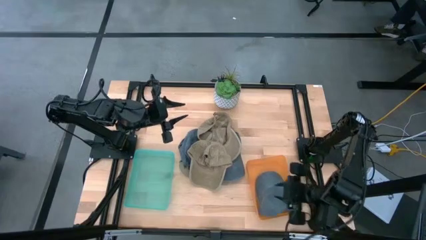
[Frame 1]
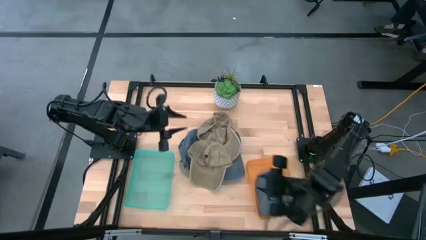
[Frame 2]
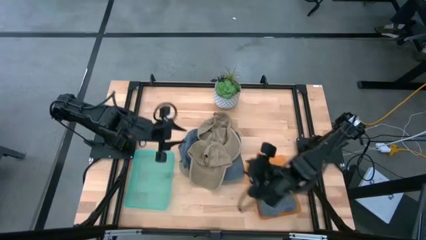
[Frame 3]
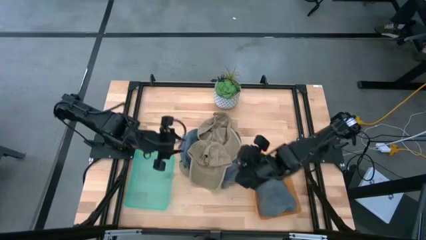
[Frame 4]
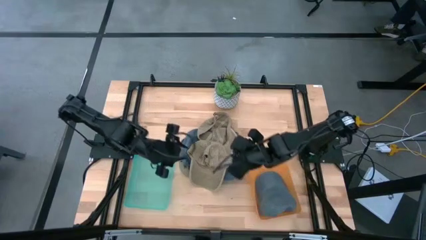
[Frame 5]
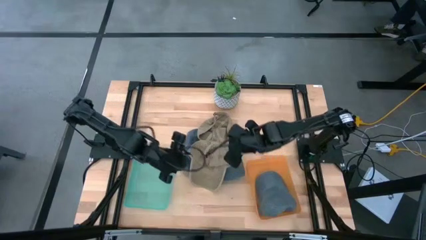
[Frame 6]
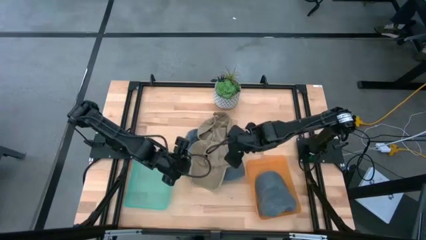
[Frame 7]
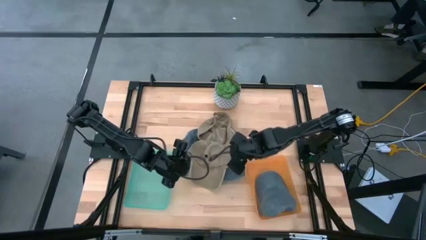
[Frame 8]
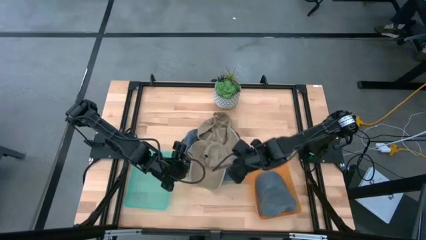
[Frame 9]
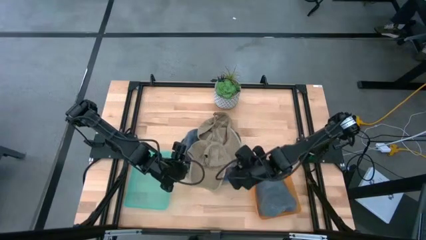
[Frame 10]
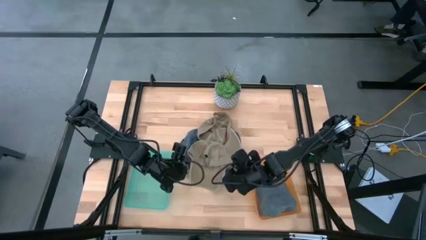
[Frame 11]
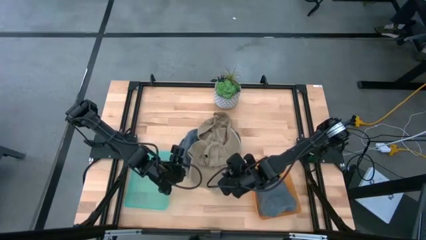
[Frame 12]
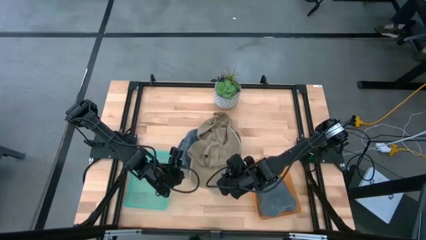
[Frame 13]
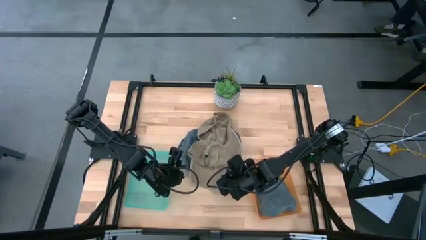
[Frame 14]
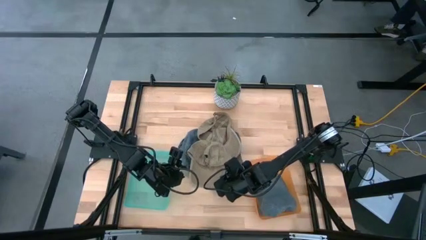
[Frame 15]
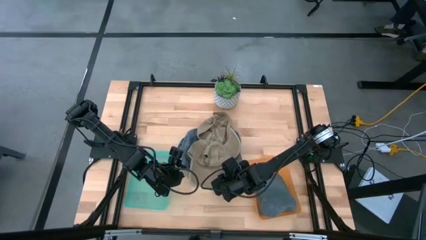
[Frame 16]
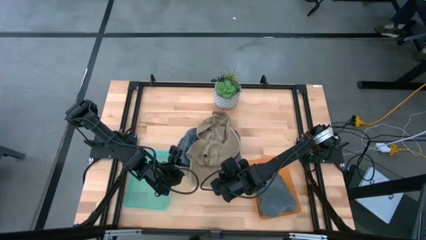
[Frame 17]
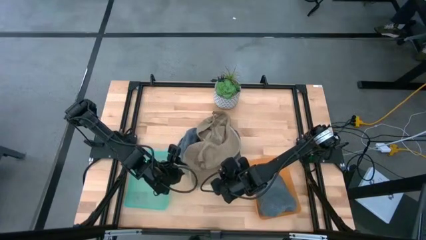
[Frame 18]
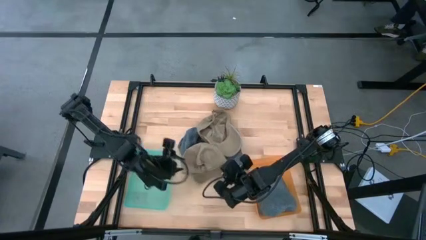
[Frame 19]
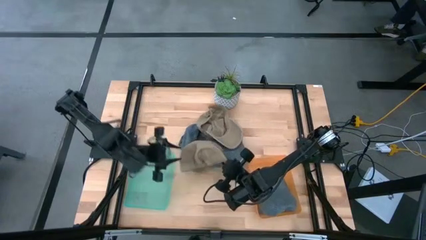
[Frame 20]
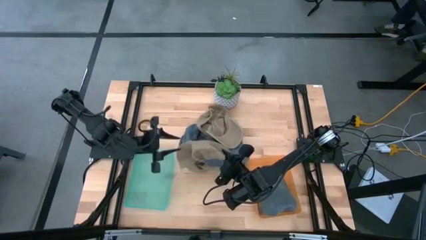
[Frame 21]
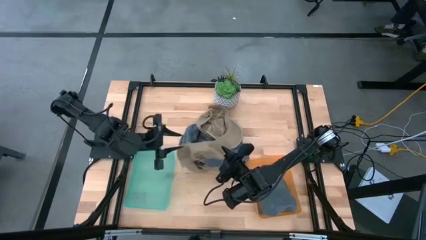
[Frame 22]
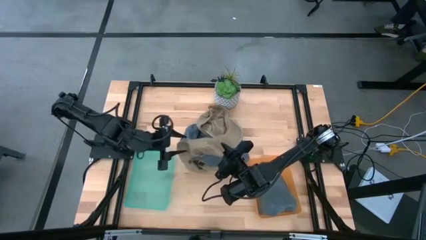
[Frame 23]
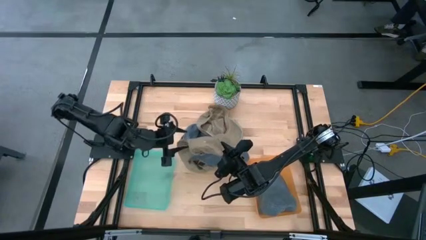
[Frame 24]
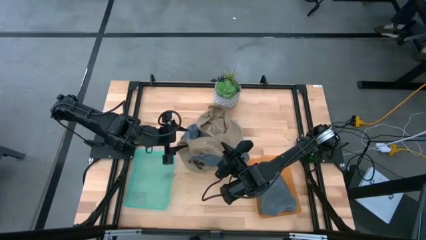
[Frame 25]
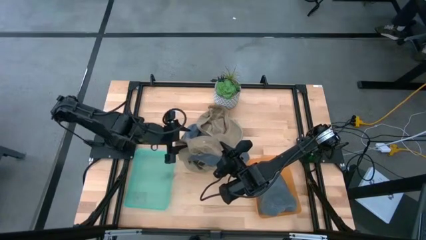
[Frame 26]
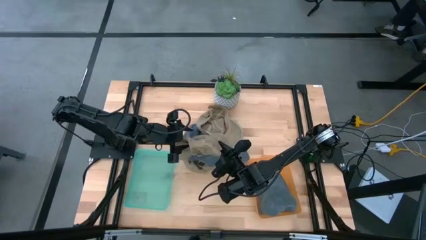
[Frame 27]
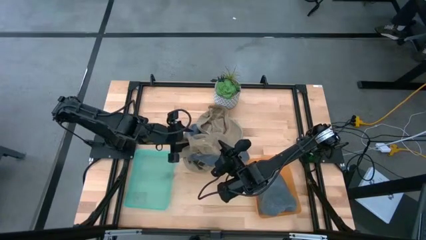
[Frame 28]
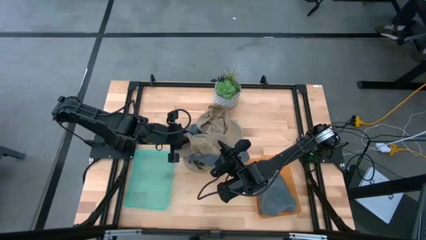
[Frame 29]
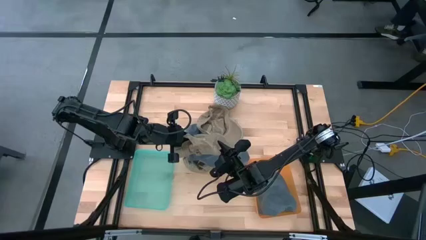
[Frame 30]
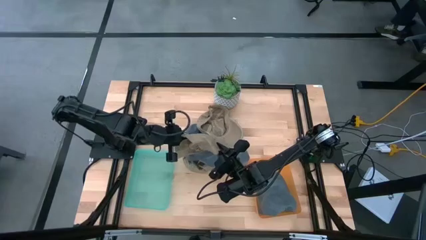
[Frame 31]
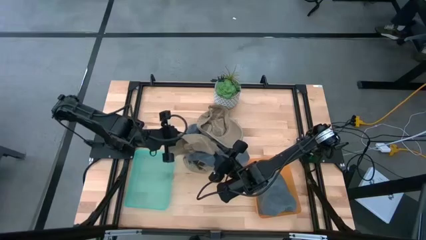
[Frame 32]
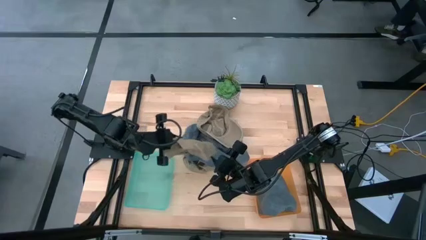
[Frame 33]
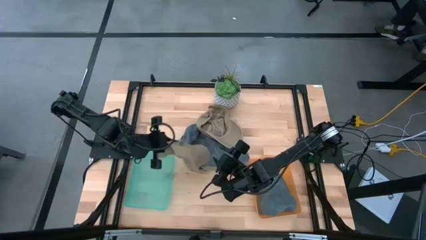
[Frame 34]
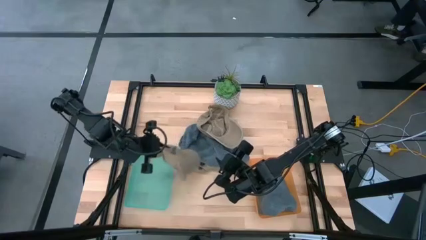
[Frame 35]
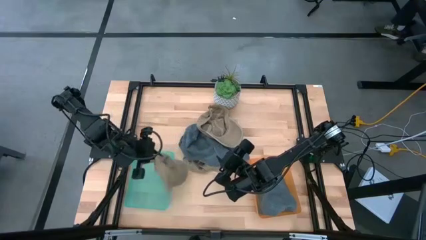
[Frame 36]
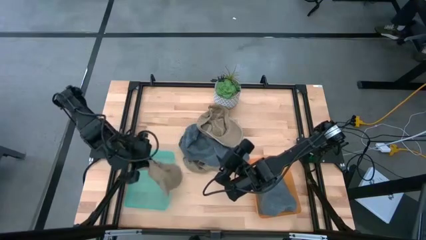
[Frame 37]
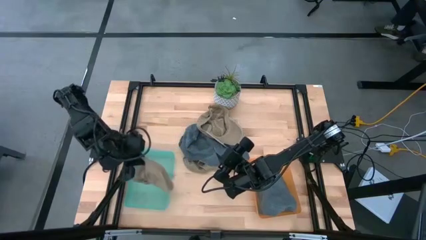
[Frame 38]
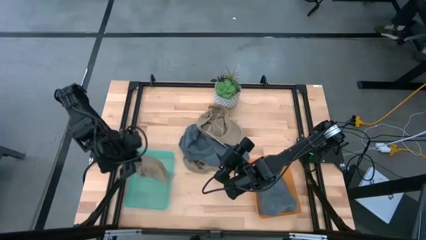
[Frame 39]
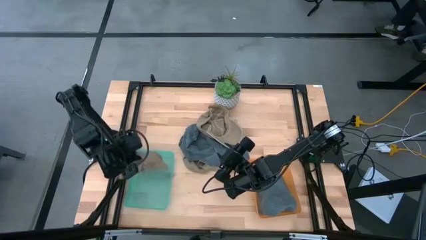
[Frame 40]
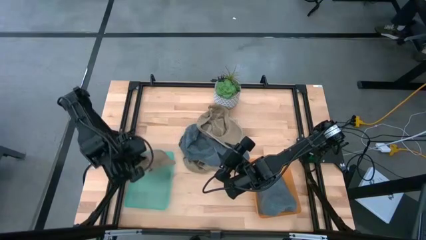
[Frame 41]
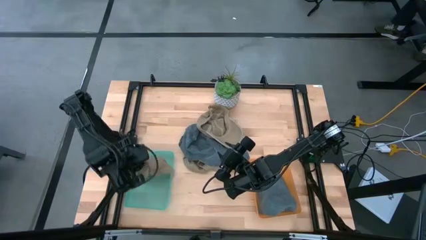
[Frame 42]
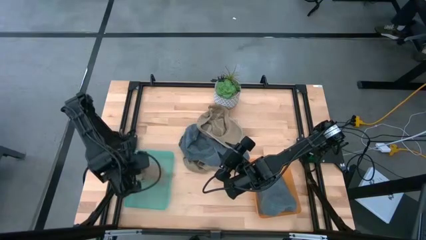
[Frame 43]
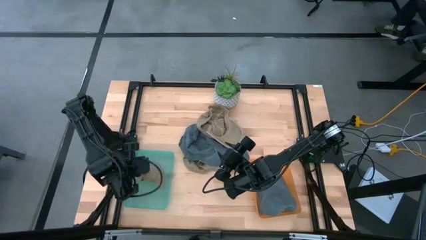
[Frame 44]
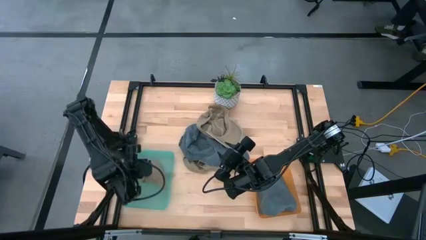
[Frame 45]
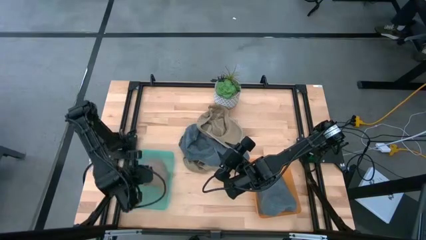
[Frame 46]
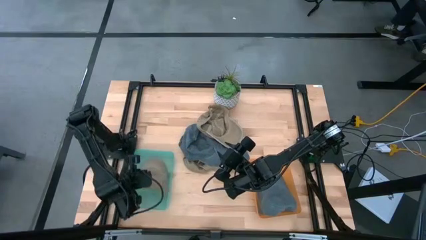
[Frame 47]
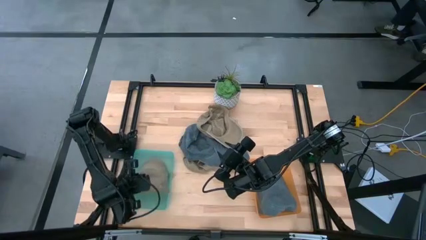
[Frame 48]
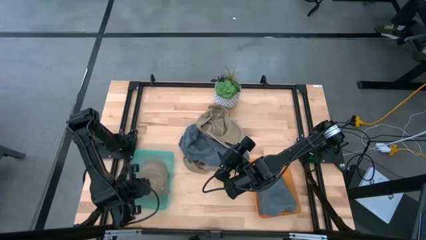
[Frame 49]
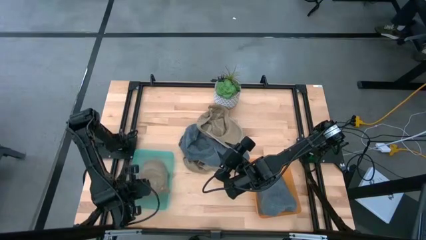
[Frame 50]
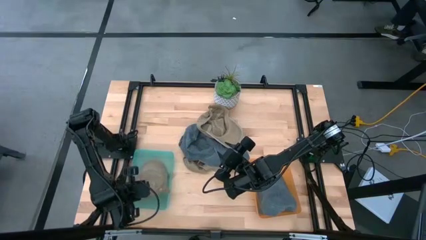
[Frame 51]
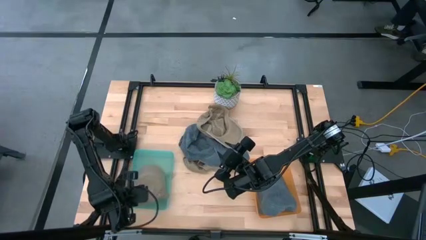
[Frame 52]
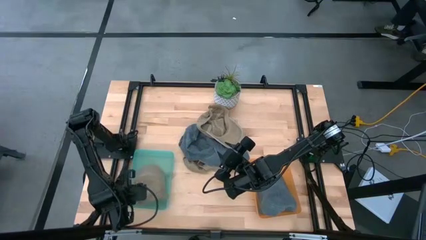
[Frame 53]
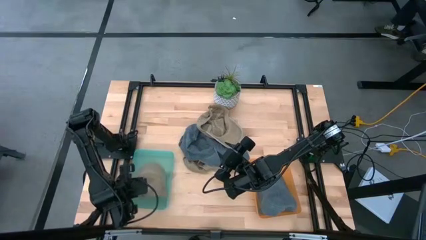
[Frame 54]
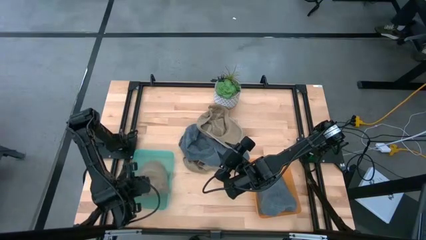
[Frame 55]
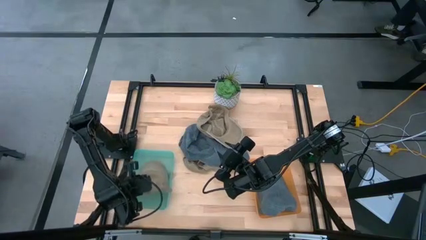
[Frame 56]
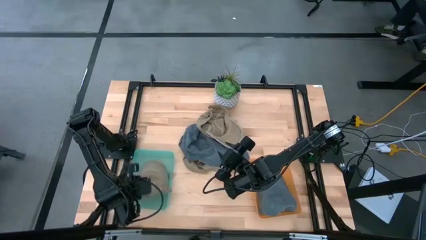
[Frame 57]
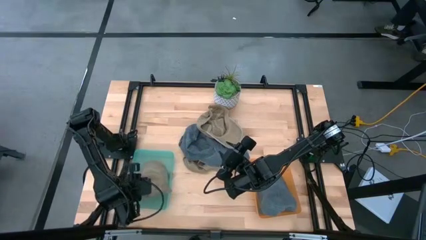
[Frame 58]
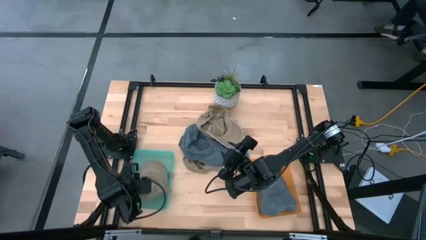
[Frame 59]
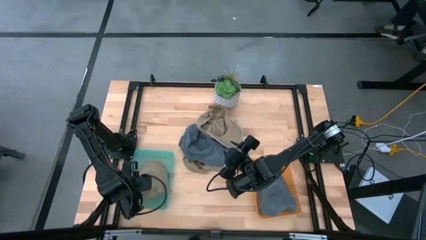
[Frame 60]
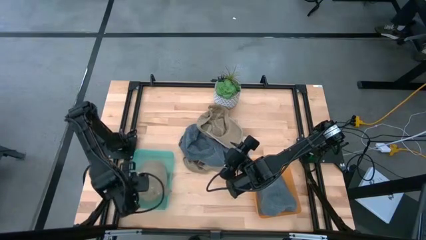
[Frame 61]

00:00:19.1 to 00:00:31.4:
Task: Pick & Place hat
Put the brown cap into the blue bin

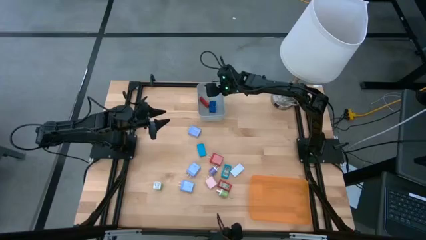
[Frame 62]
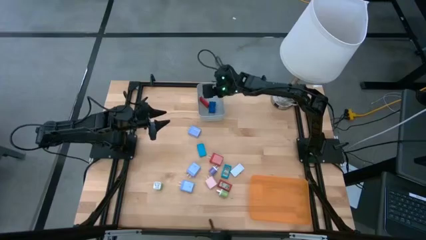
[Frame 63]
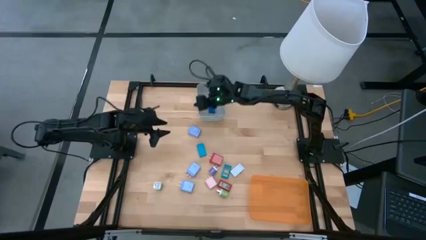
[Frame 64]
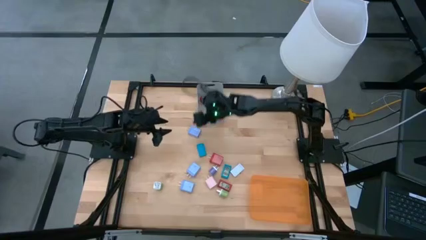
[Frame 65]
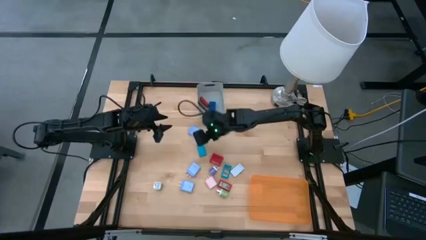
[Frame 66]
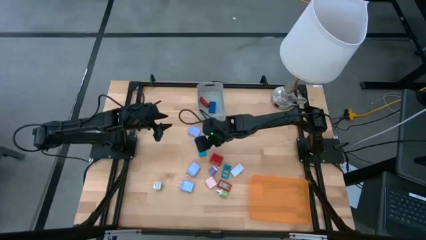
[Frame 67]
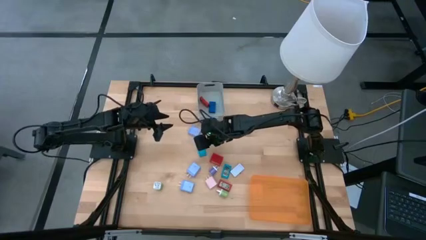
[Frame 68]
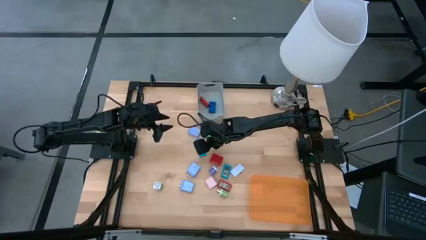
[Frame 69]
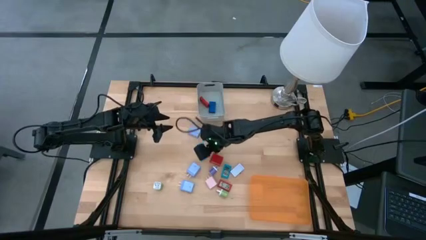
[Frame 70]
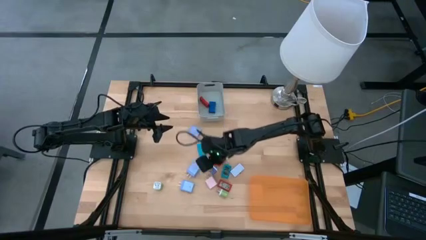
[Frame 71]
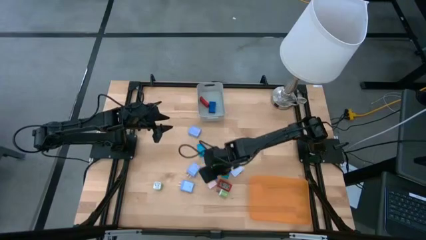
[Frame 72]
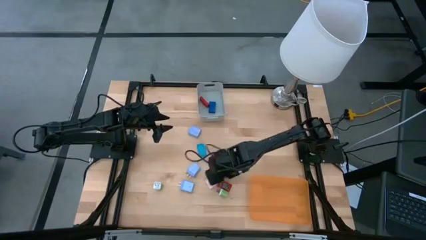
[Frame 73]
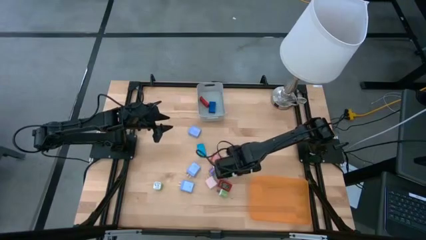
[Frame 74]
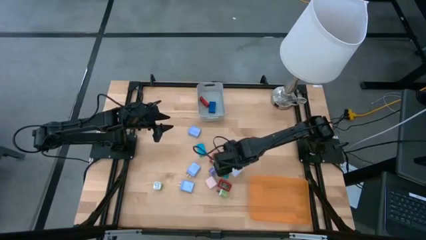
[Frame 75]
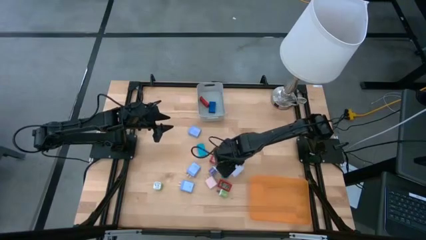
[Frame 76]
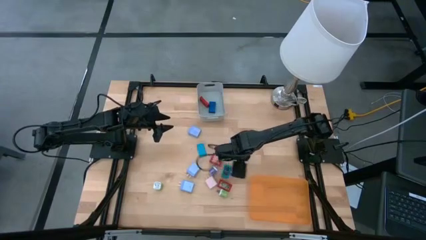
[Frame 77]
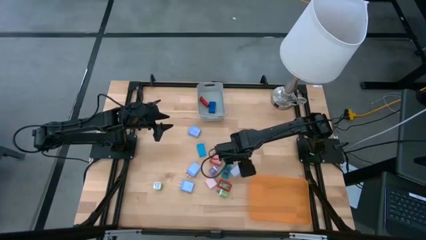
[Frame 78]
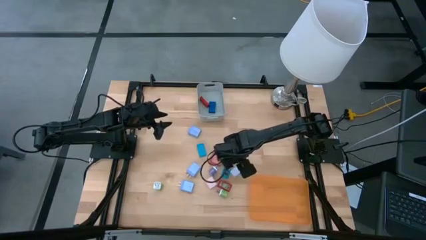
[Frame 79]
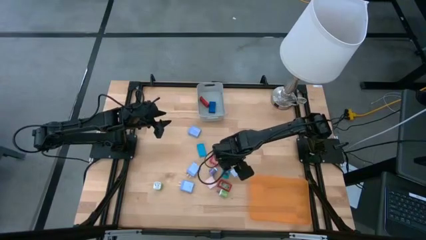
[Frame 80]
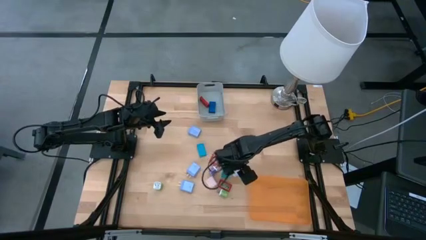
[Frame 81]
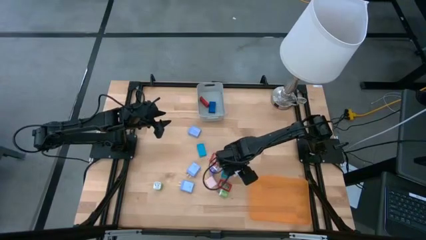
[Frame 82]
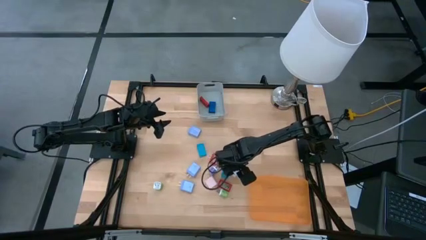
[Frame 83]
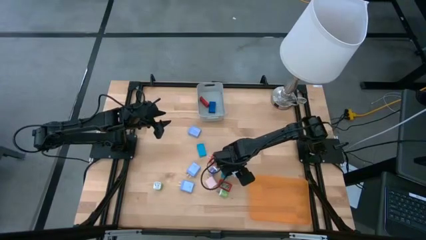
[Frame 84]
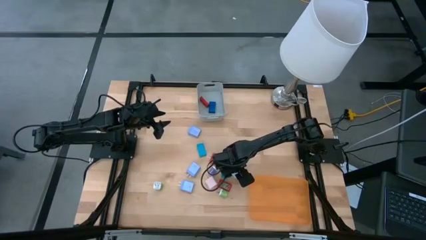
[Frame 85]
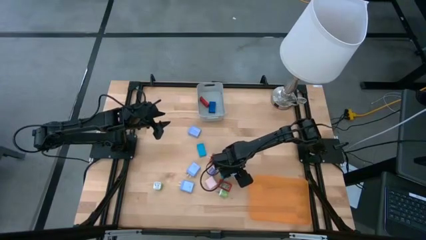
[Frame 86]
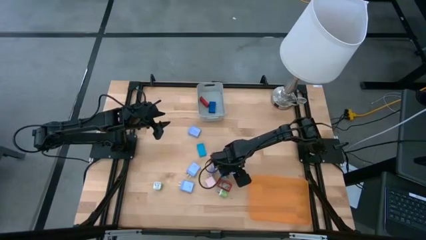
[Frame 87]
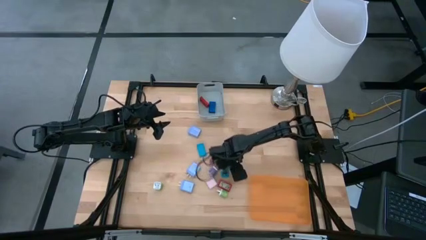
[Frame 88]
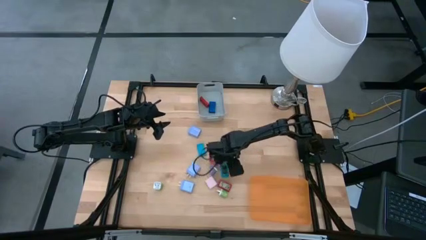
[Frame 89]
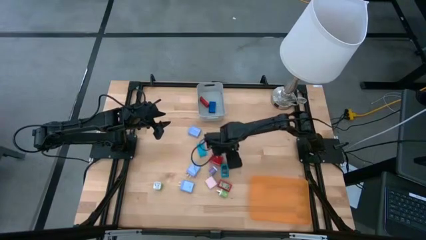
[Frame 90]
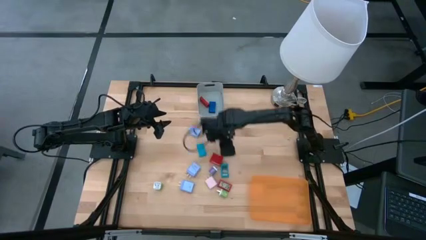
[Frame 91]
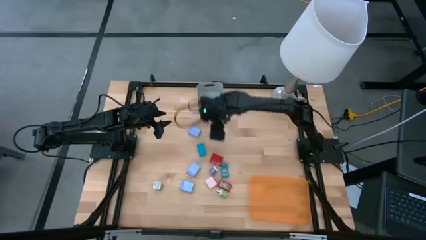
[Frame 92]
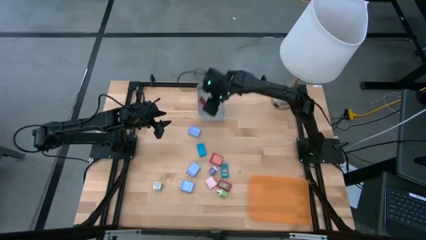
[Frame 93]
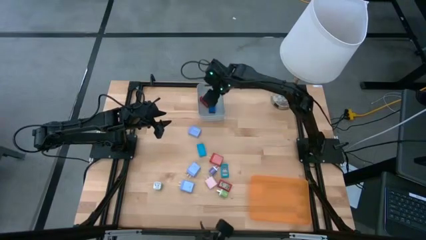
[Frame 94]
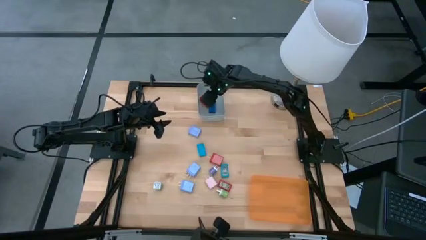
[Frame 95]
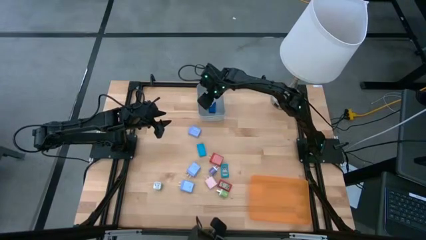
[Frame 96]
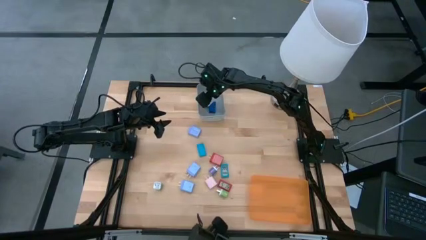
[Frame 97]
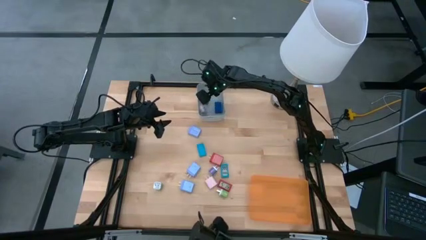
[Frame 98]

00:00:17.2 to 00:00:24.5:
Task: Pick & Place Office items
Put the white digital timer into the gray bin
